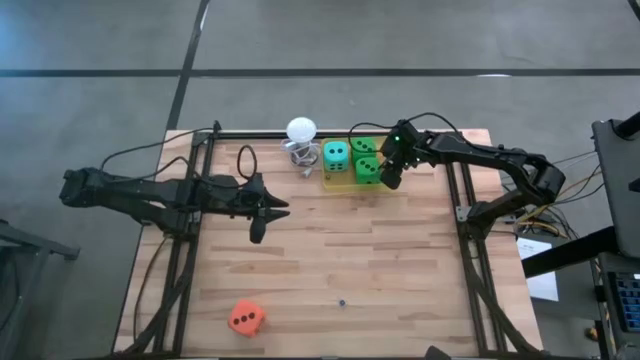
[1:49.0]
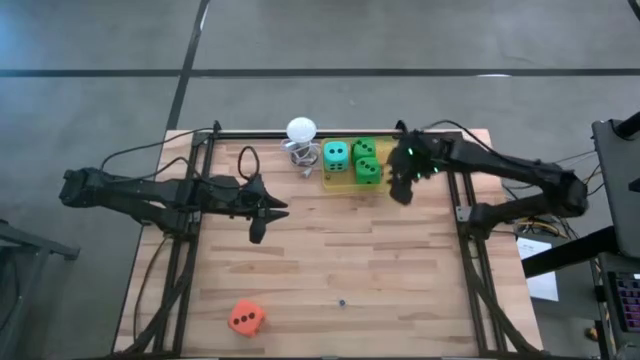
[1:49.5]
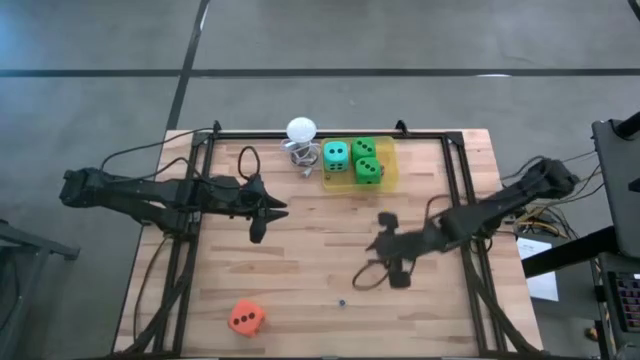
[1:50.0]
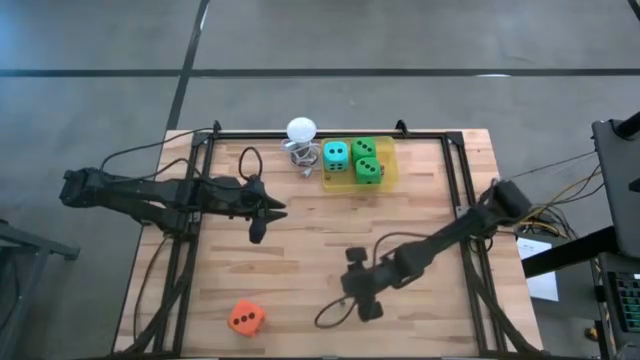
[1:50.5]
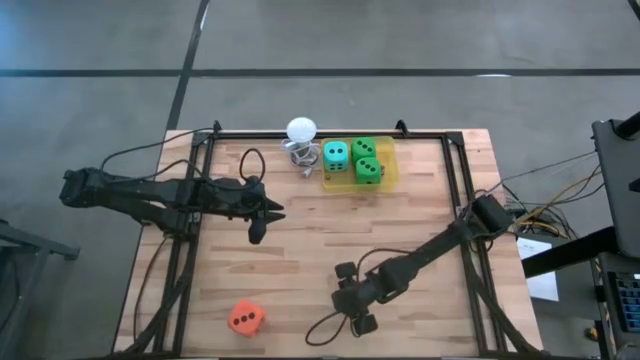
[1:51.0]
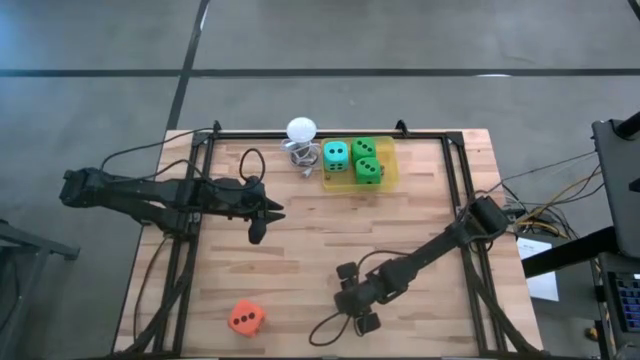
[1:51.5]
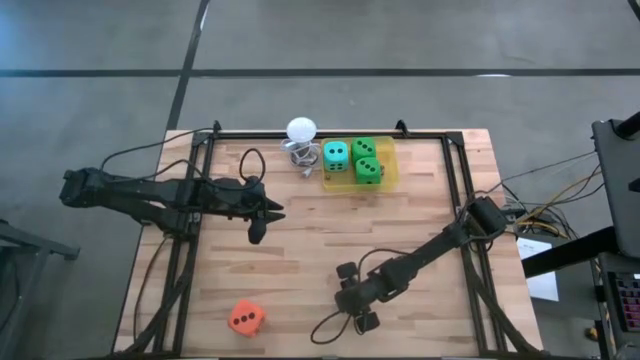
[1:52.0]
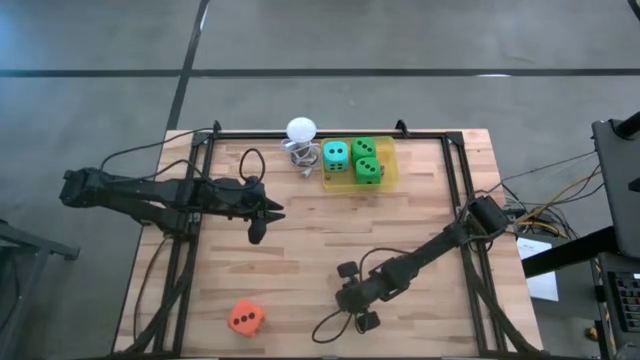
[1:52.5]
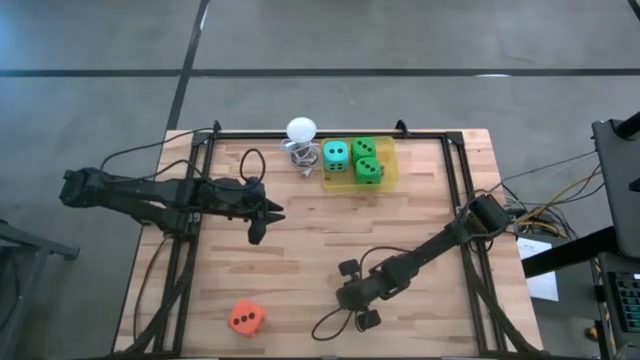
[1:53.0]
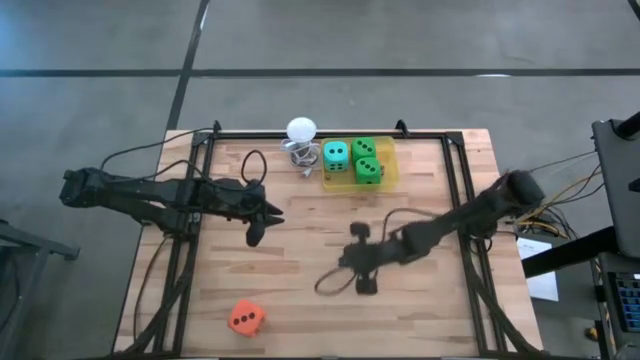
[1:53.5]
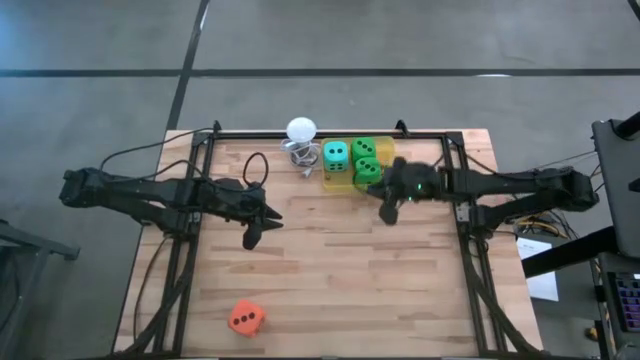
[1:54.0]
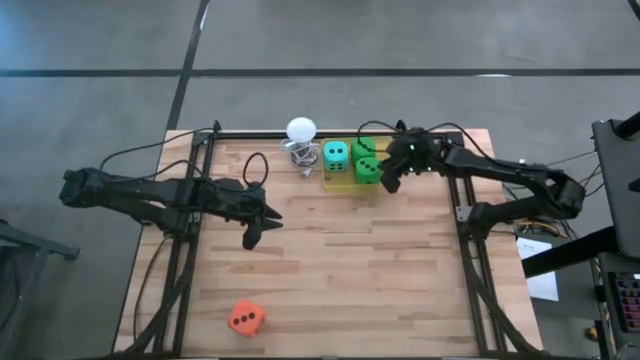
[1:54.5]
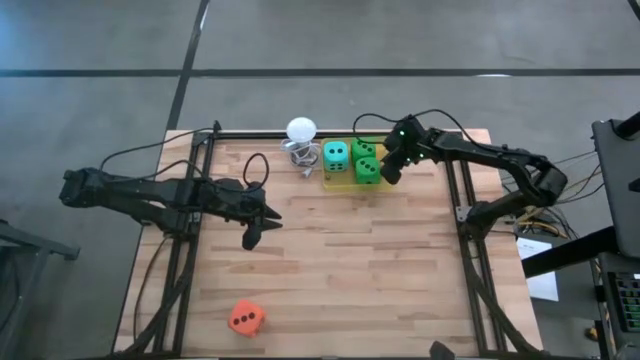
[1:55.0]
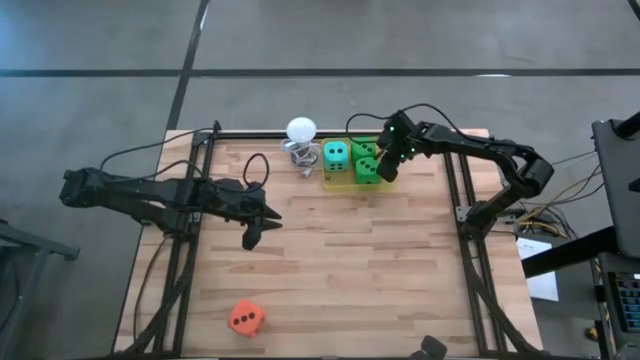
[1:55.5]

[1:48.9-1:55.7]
Task: Pick & Place Dice
Put the small blue dice into the yellow bin

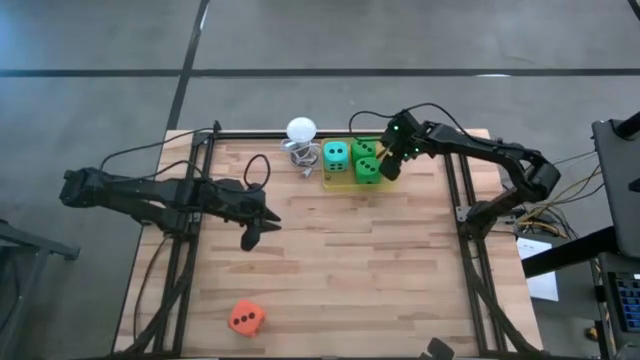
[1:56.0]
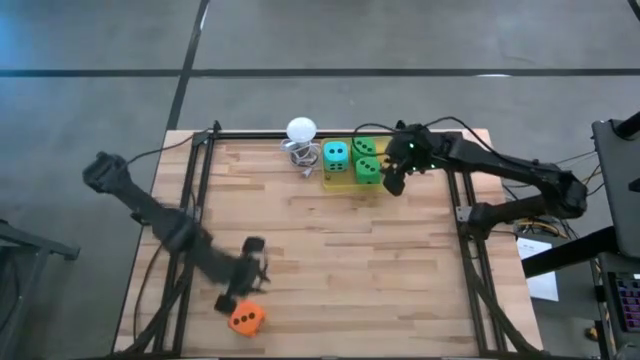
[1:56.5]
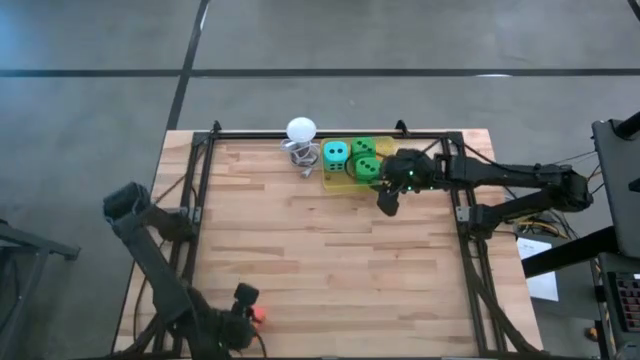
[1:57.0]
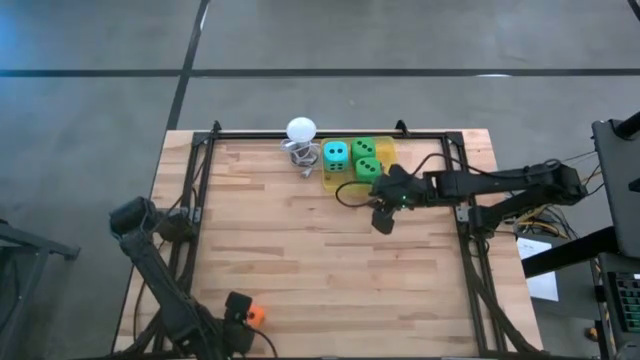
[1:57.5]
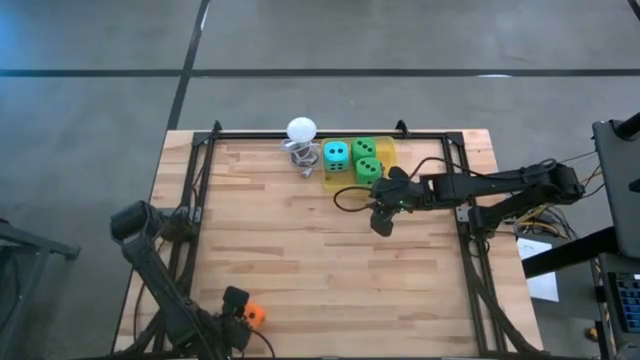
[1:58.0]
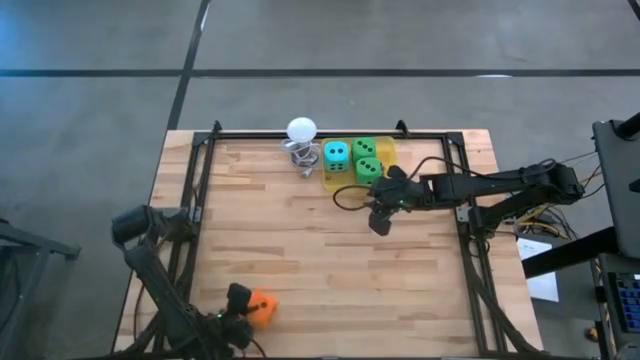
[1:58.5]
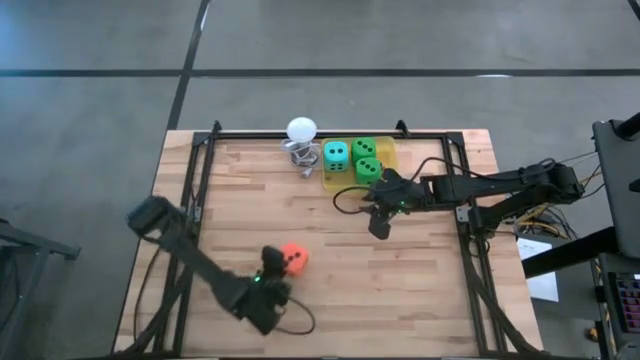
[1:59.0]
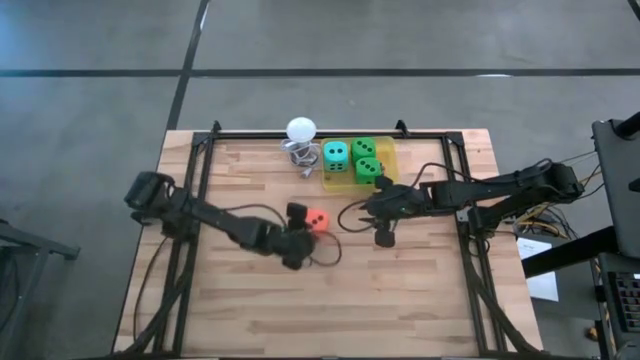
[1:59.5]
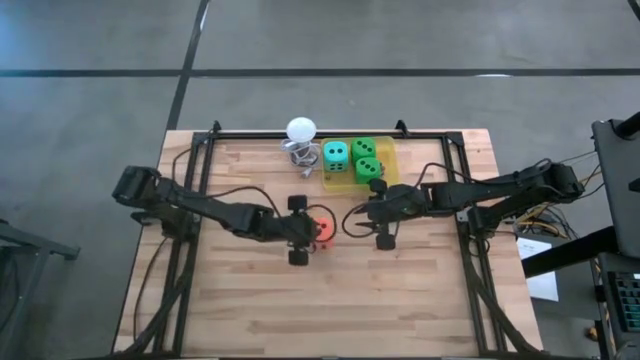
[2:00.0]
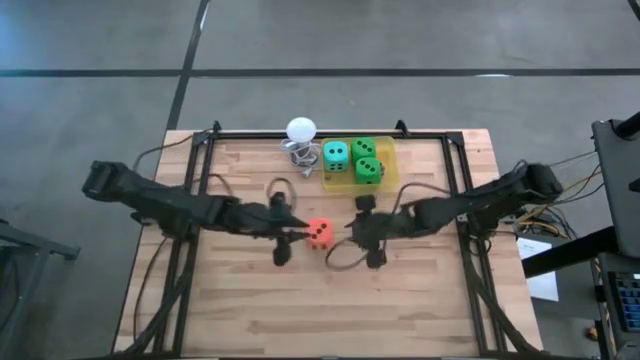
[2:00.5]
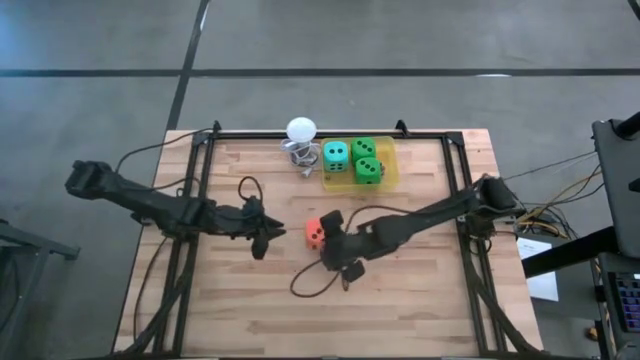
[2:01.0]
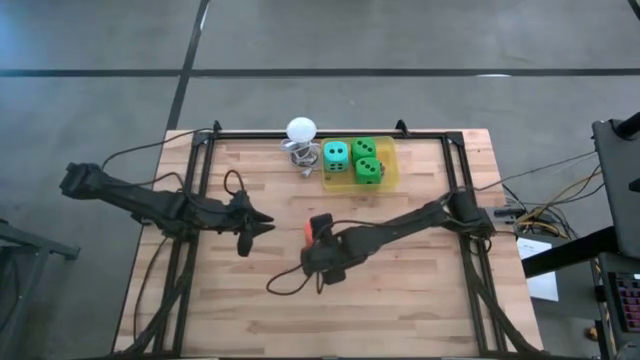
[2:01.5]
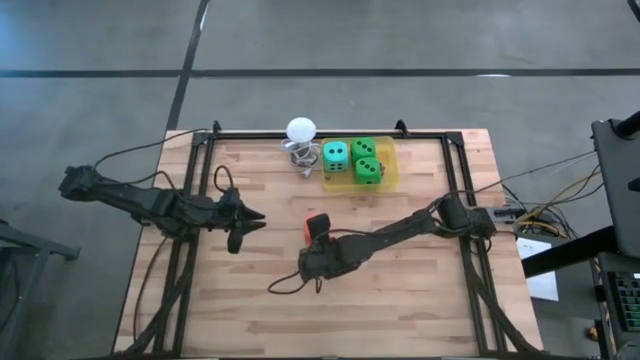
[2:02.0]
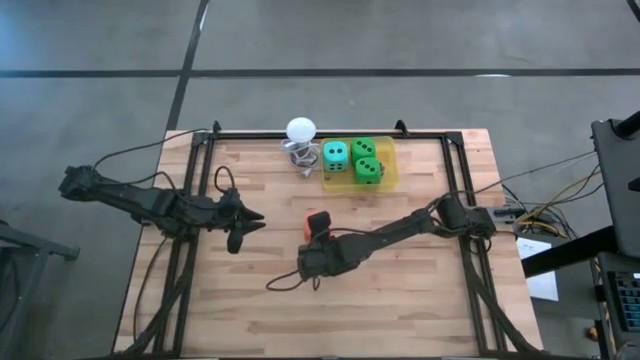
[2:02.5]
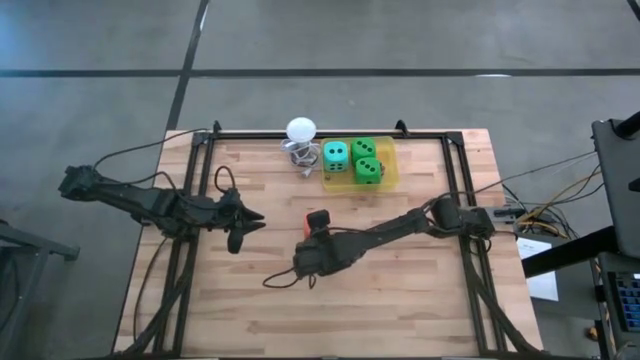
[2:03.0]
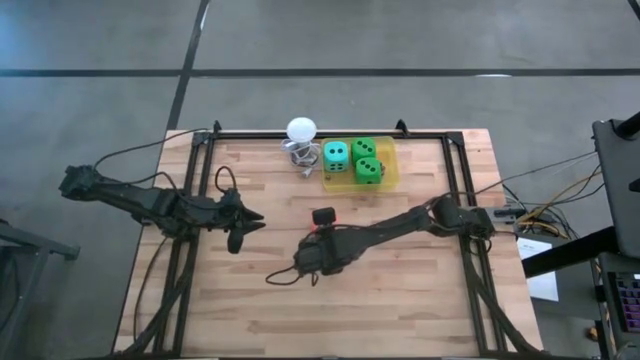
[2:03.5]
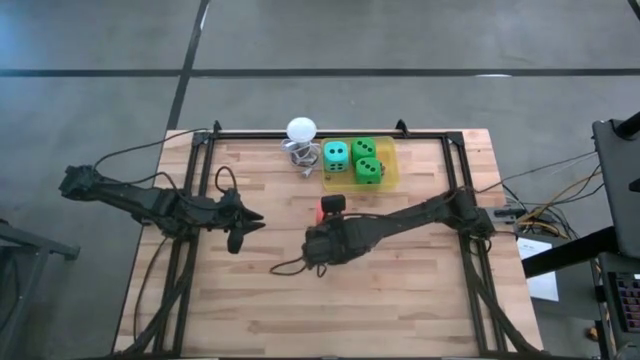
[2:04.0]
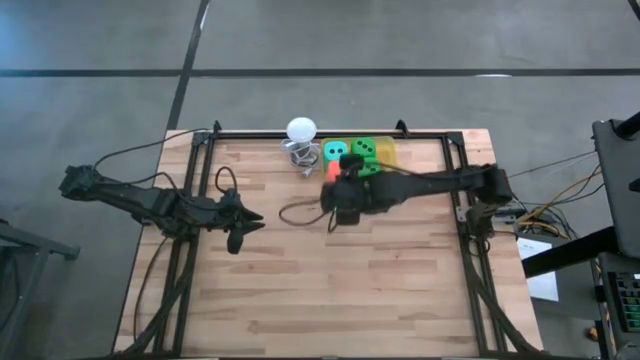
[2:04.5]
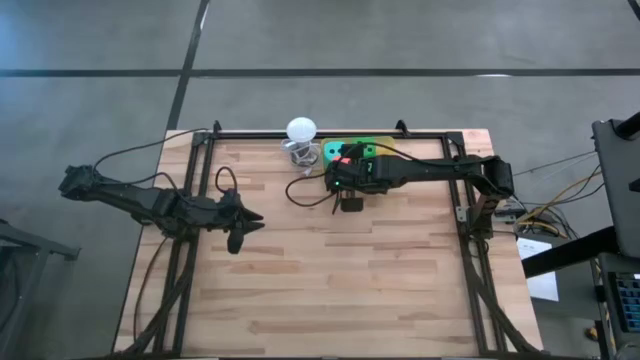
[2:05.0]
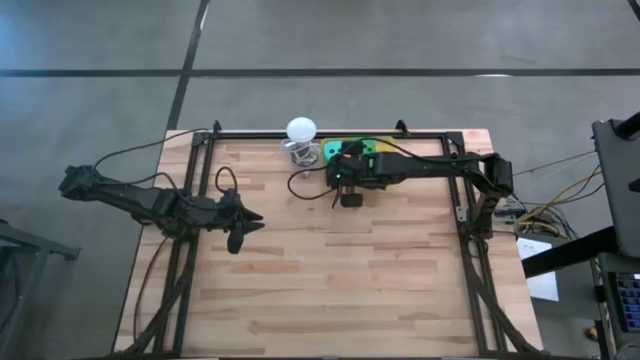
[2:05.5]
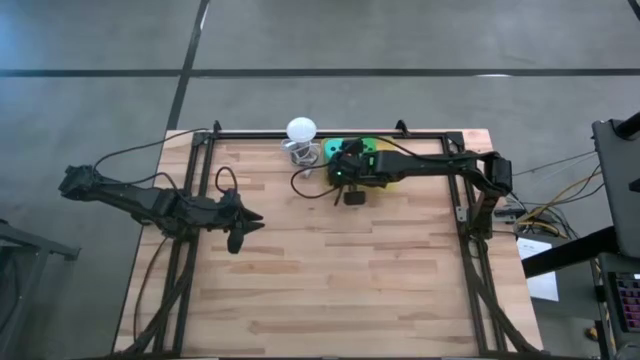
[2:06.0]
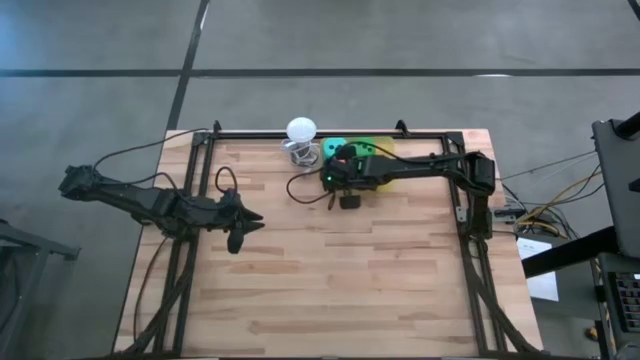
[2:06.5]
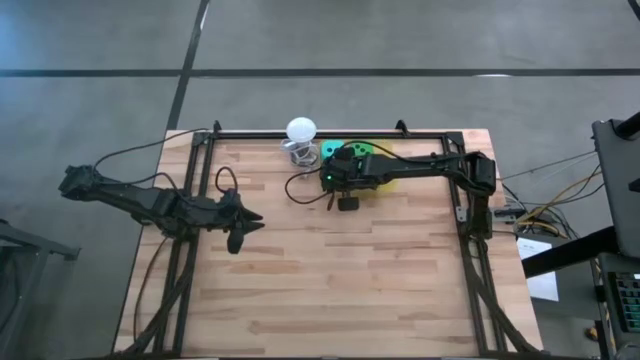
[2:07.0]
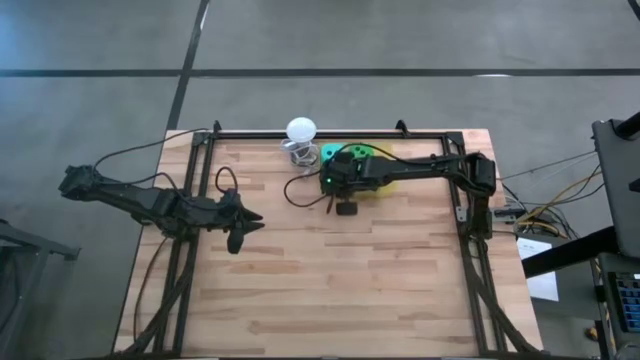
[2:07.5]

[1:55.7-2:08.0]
Put the large orange dice into the yellow bin

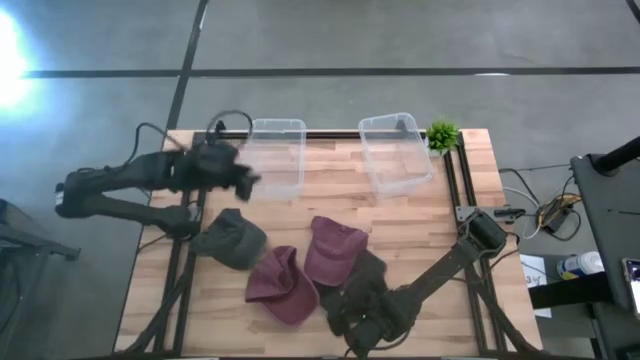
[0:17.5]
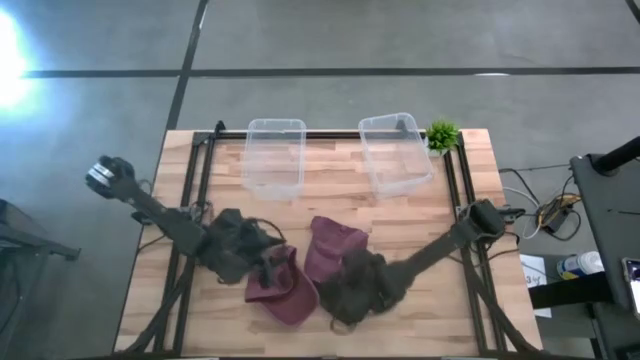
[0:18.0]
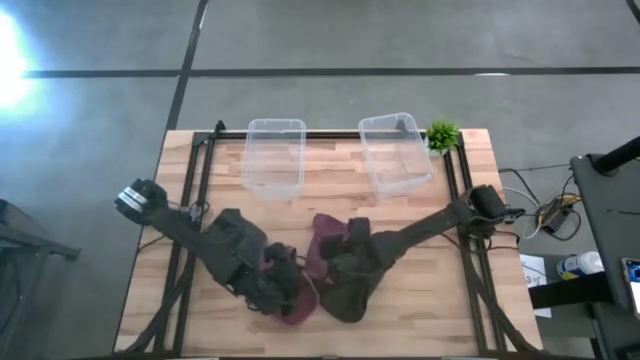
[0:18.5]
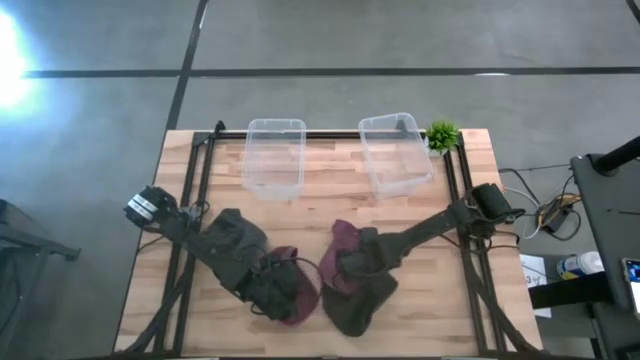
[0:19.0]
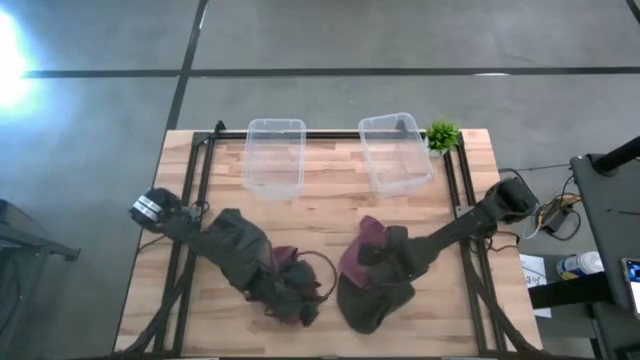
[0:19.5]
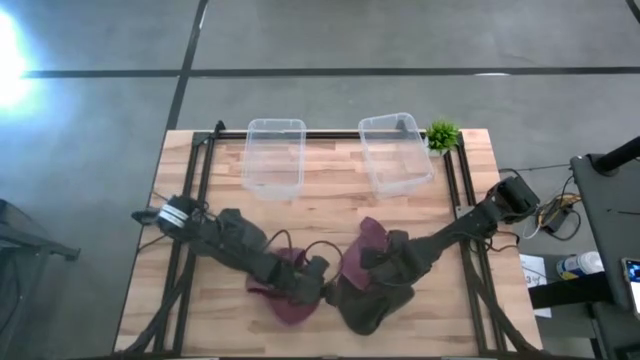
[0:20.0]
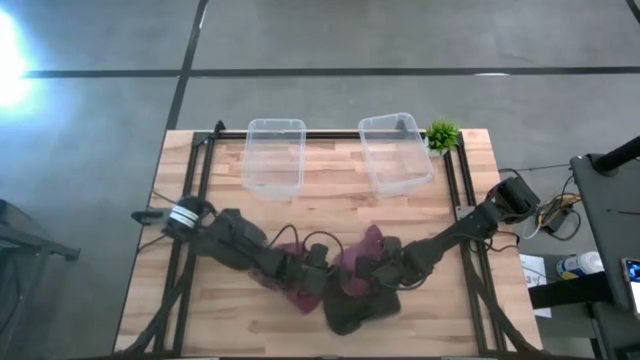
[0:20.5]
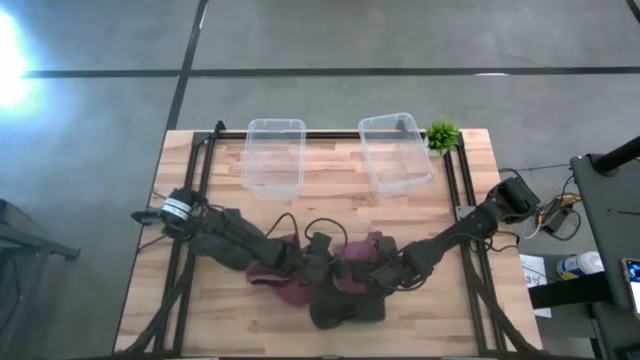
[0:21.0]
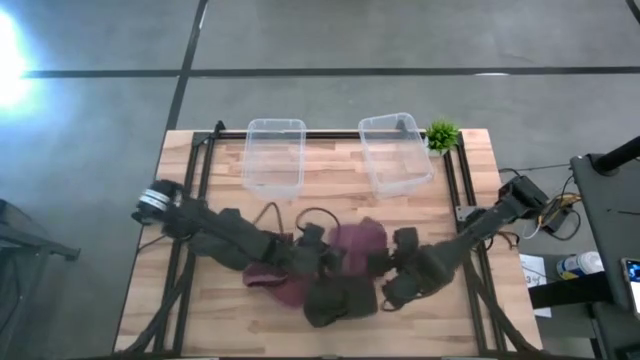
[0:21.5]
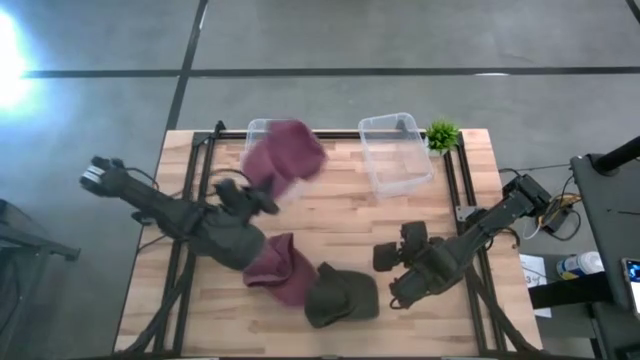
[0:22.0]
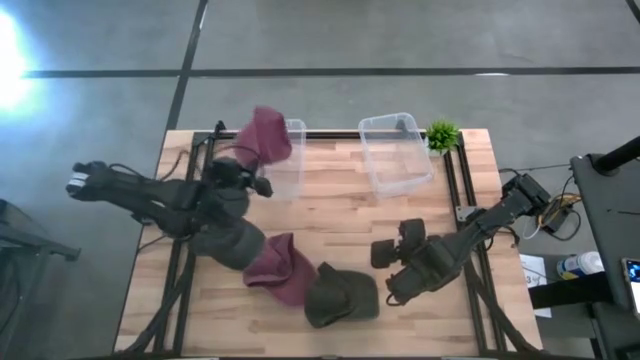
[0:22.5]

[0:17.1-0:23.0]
Task: Pick & Place hat
Put the right red cap into the left transparent bin
